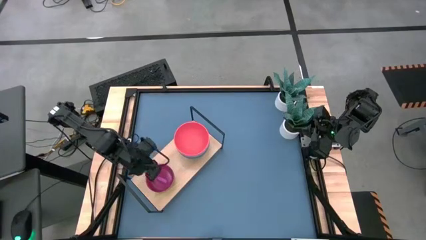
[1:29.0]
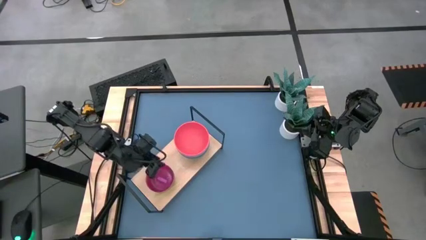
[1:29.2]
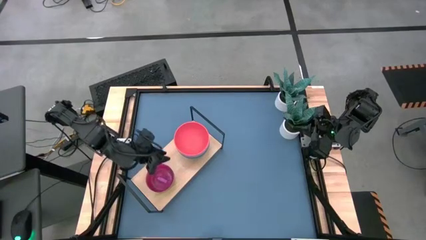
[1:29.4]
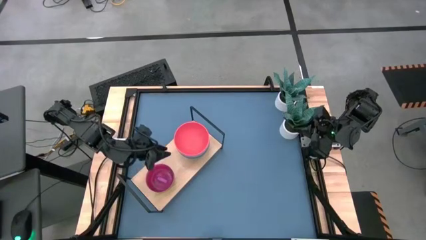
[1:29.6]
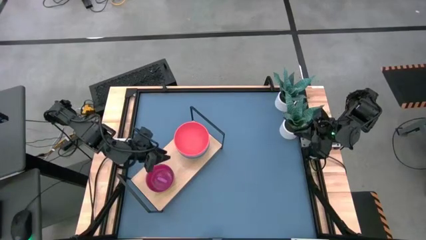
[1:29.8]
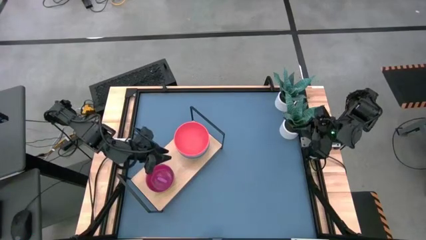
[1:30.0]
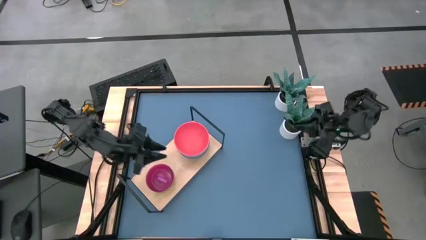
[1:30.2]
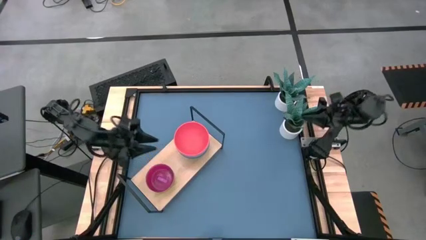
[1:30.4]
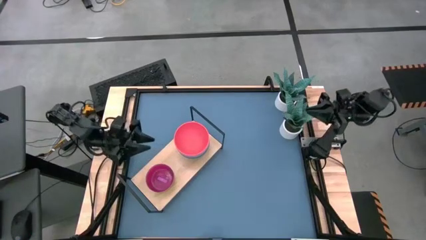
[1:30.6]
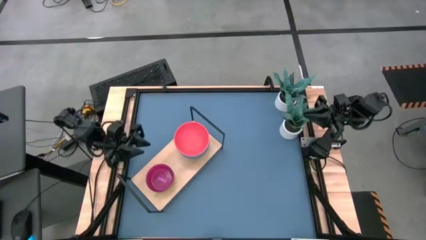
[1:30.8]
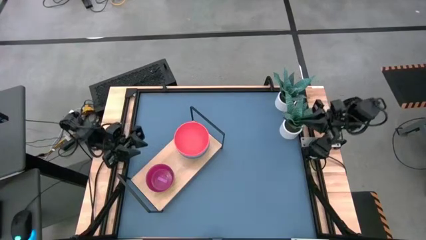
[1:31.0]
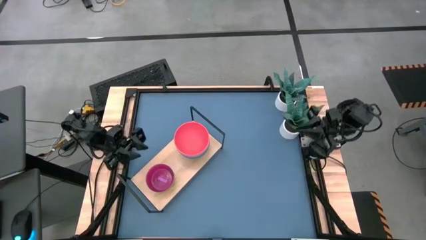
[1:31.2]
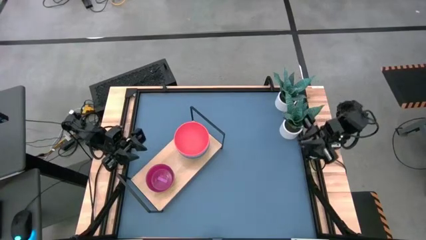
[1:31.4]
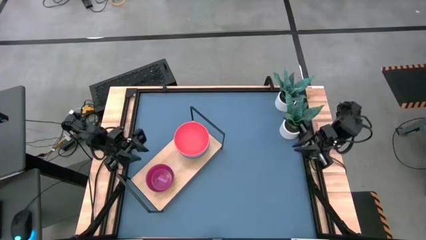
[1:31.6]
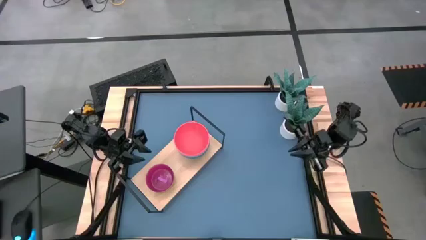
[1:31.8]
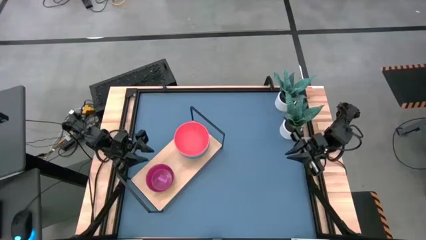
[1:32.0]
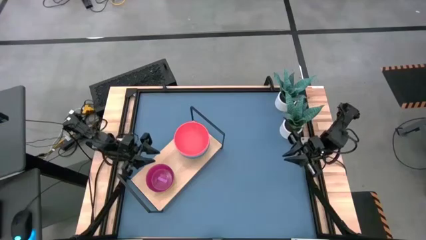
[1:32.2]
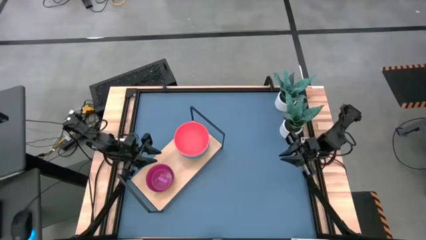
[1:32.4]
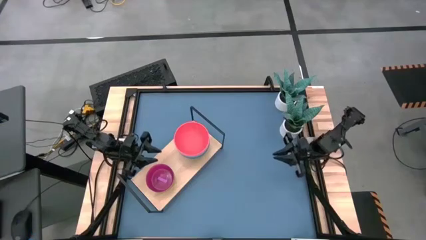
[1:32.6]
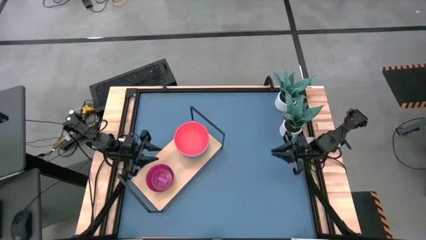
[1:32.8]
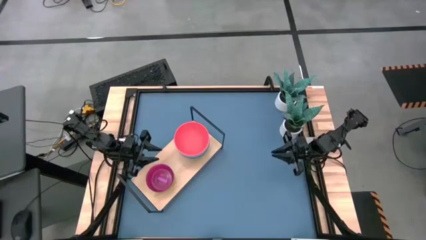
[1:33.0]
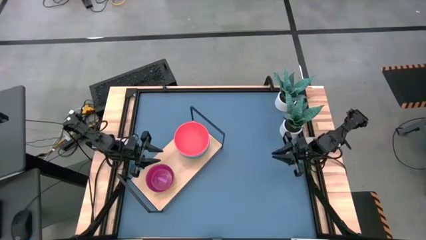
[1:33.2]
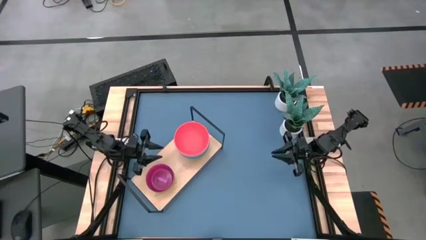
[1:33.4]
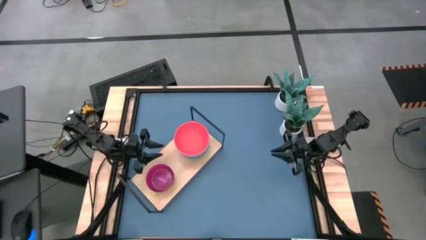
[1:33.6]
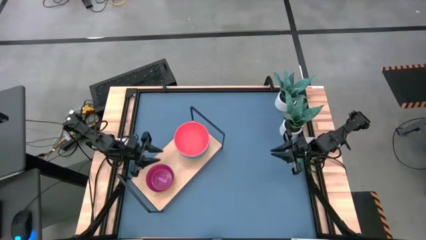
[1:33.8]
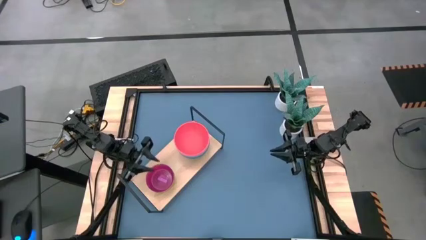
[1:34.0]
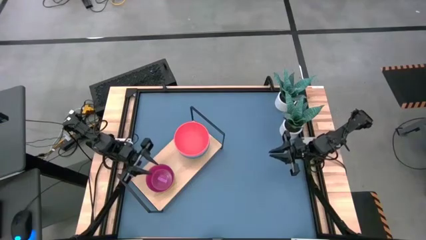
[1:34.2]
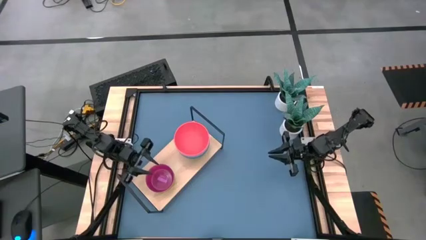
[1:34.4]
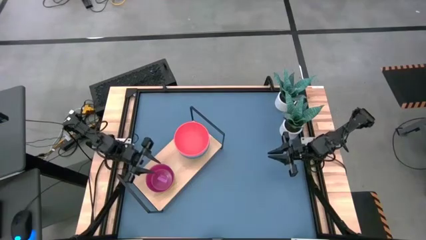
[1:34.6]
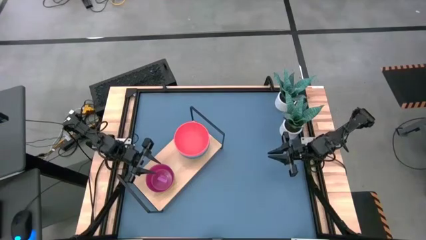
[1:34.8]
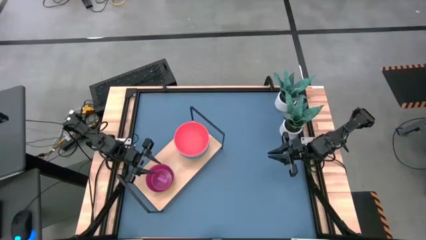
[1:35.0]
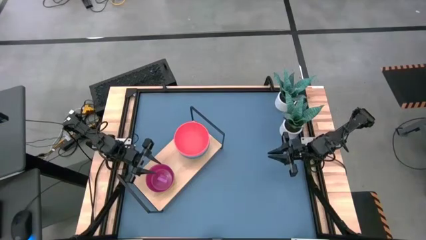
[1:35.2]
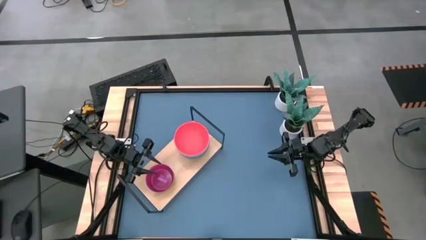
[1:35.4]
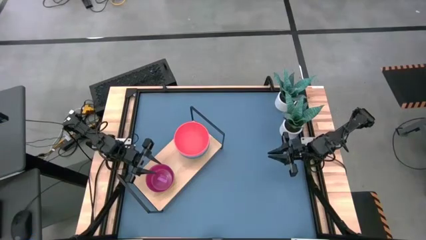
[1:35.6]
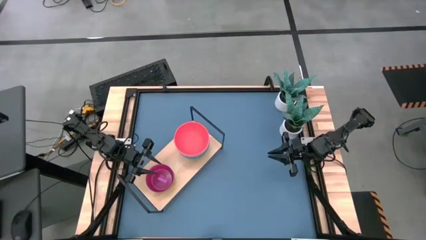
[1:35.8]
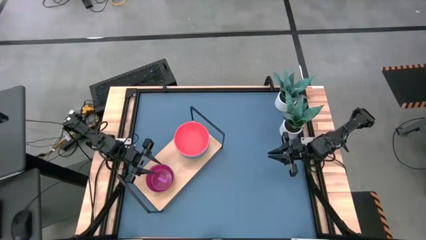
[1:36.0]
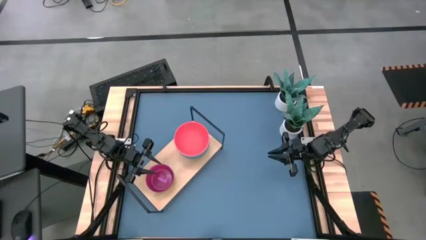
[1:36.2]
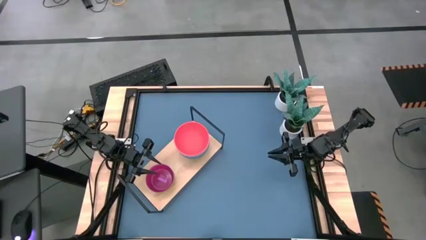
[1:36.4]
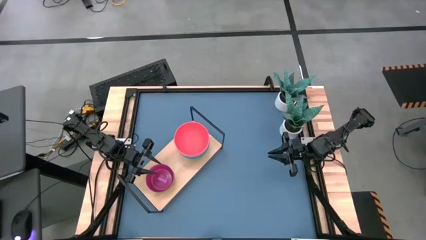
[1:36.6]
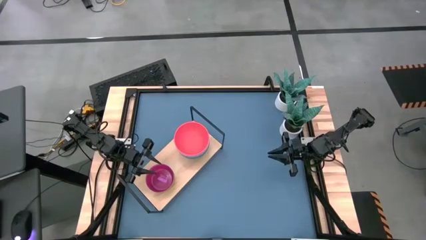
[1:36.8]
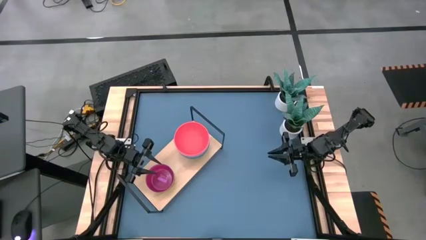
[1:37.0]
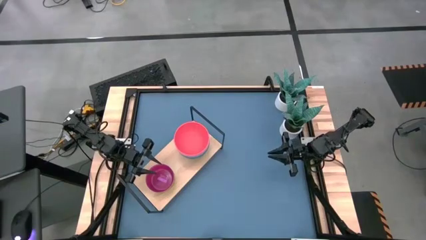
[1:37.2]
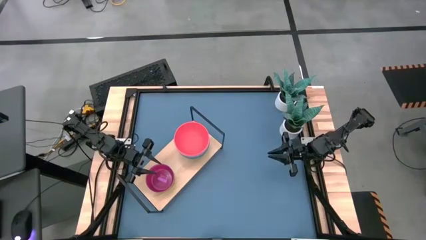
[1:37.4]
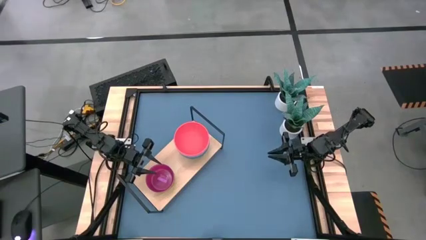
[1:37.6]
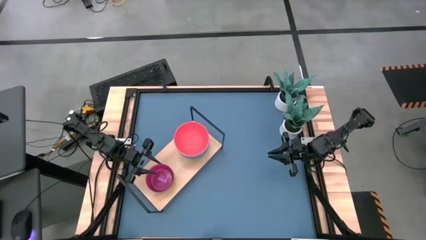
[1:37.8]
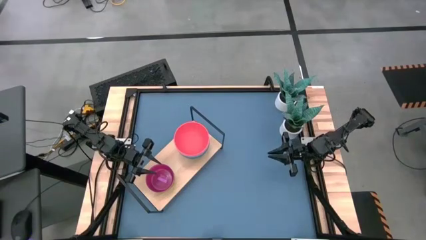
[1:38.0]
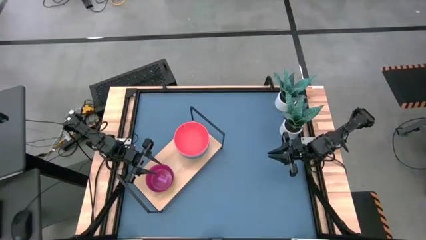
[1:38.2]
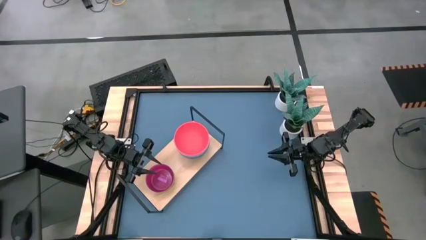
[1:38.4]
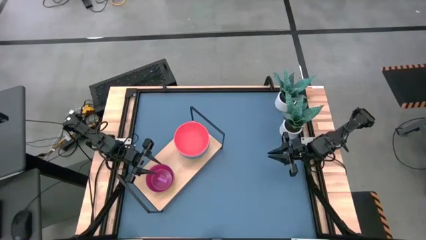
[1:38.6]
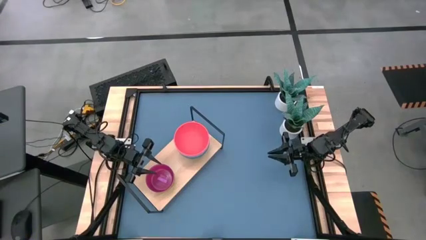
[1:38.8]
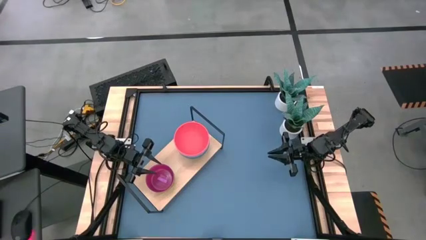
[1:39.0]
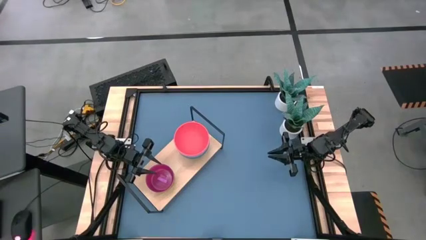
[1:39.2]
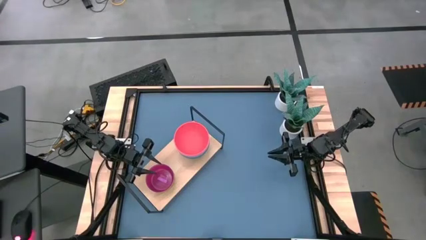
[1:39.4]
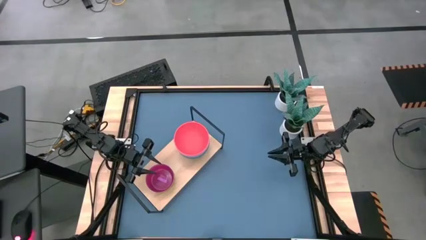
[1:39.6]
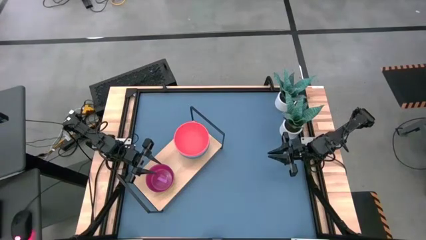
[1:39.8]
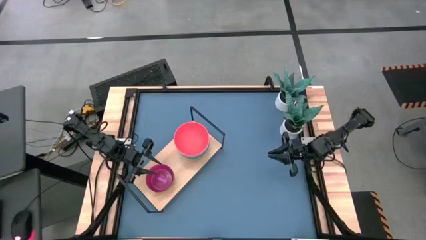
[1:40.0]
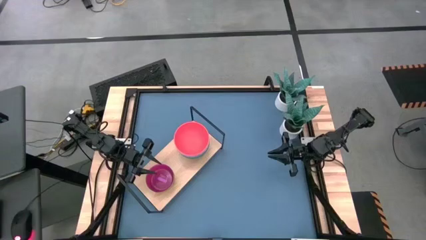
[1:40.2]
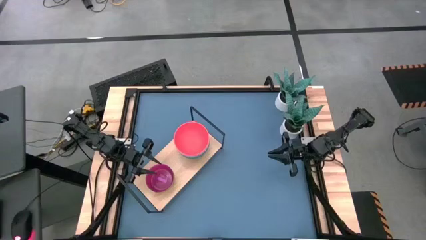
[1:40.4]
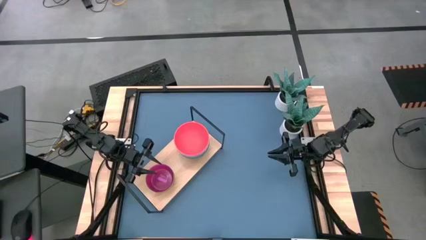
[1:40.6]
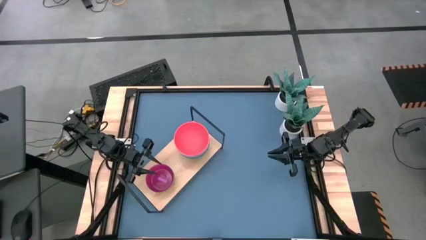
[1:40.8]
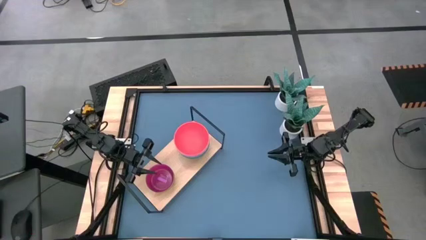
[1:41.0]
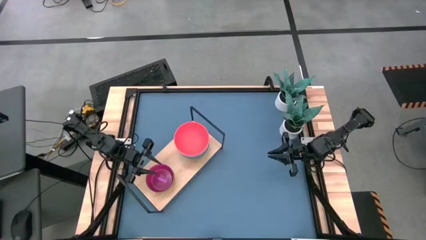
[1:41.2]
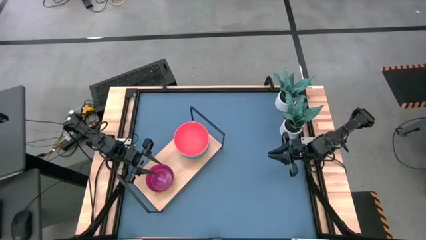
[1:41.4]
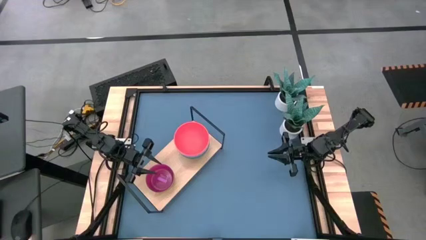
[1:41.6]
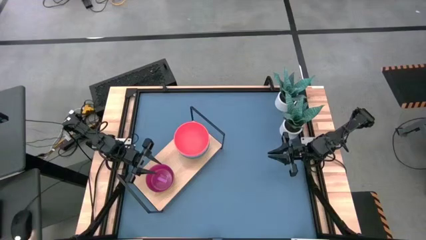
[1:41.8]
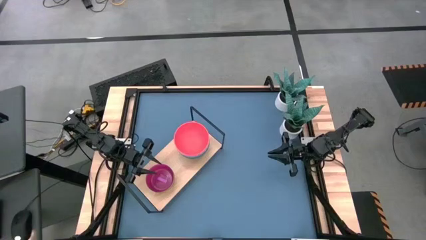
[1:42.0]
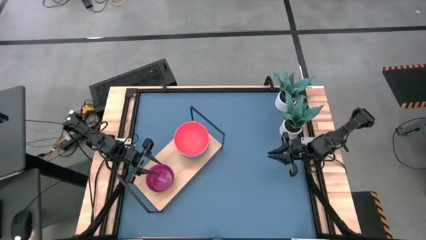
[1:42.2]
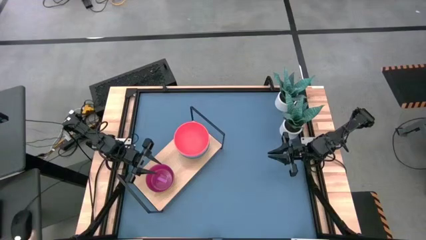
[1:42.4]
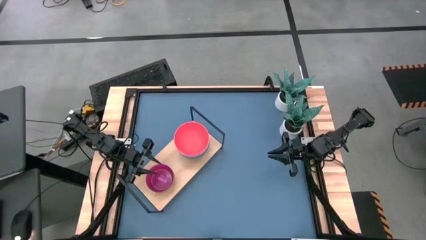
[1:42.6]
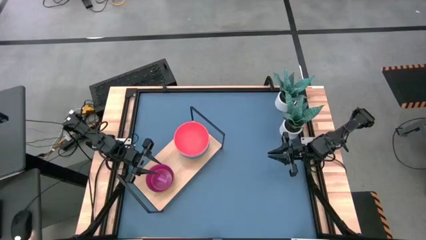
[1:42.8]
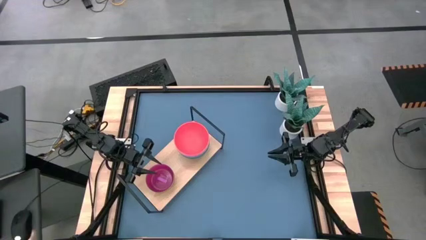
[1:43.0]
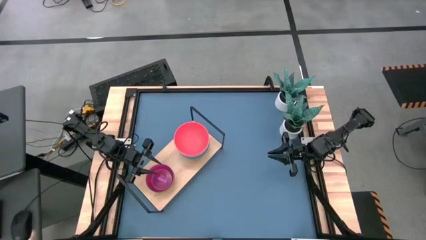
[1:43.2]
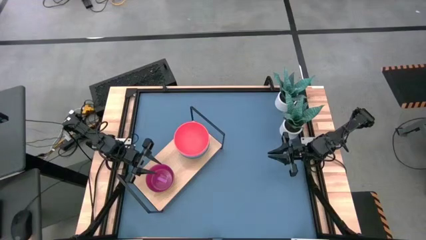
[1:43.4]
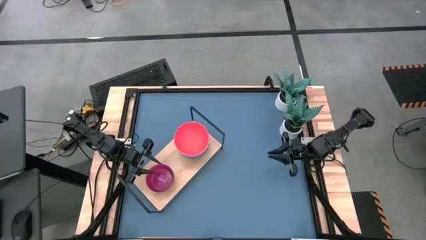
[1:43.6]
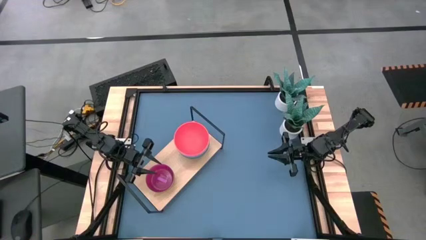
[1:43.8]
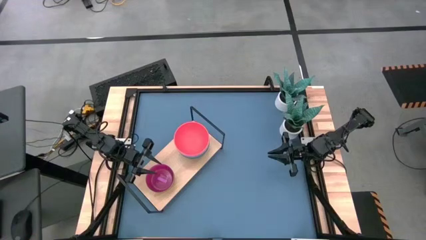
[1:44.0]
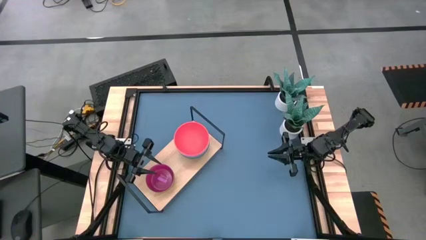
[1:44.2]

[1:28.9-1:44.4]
Task: Place and stack bowls onto a shelf
Return to Home Position

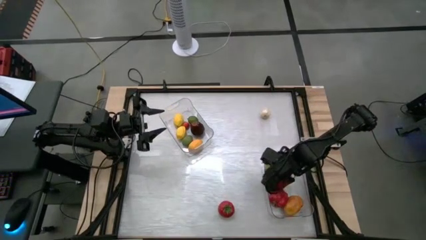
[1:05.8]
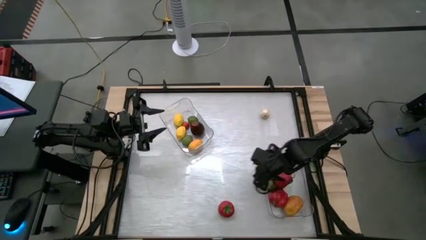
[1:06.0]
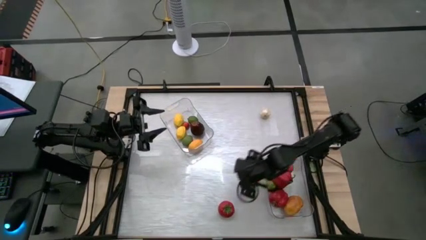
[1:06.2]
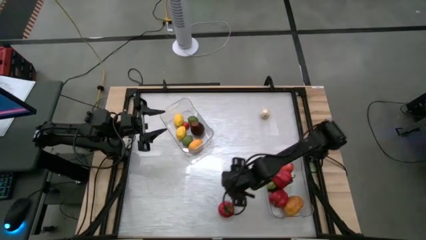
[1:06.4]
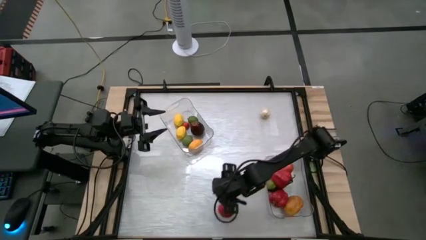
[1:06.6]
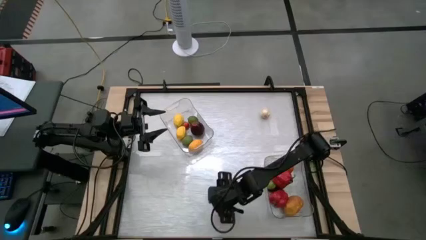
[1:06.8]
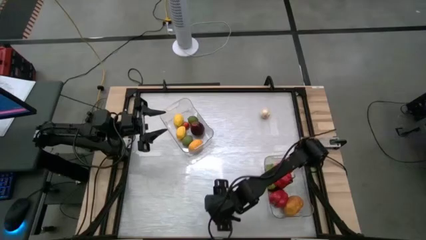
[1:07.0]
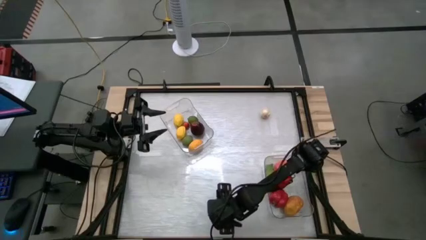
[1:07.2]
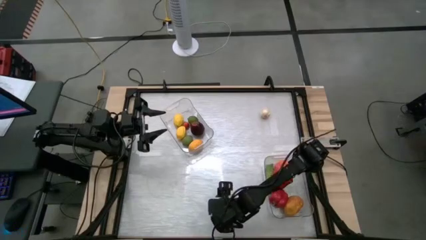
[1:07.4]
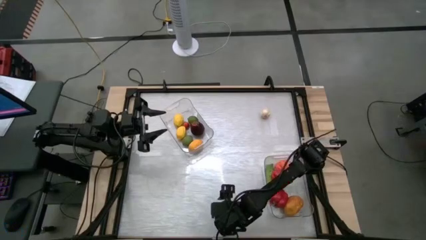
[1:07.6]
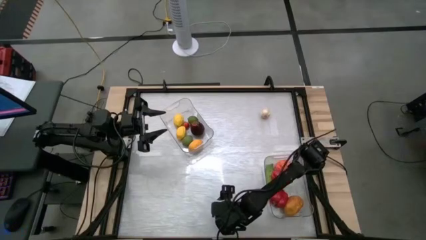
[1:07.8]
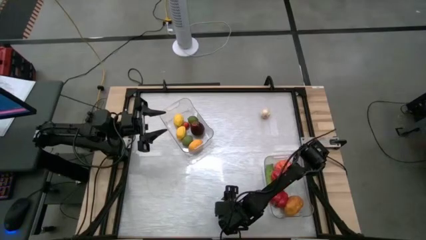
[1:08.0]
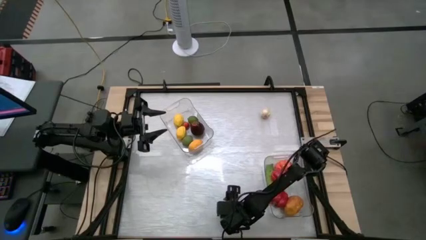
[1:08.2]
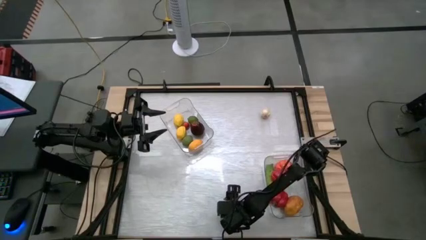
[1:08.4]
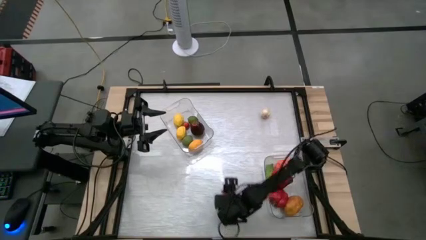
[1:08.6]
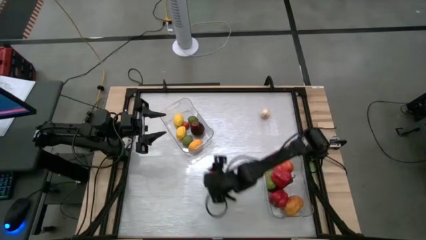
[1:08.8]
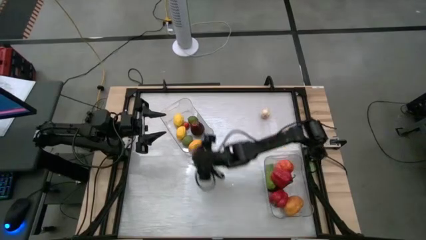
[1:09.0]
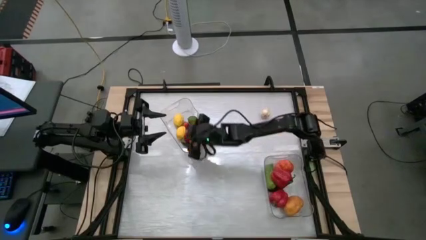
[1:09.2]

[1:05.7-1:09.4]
Task: Sort produce into baskets
Put the red tomato into the top transparent bin
